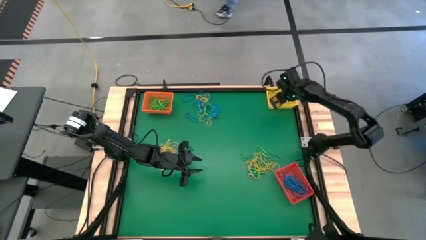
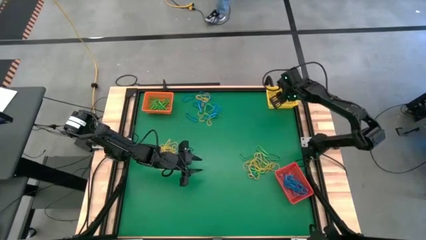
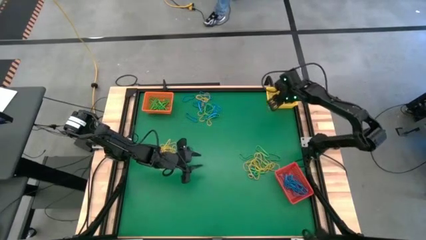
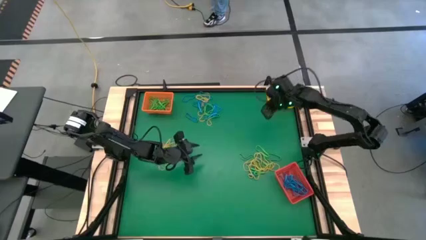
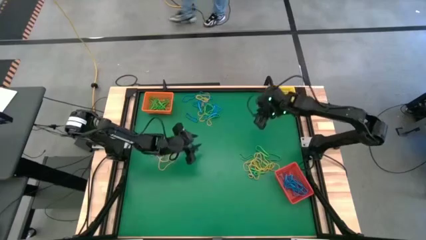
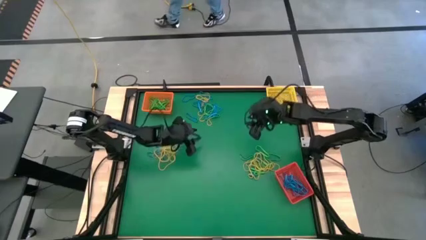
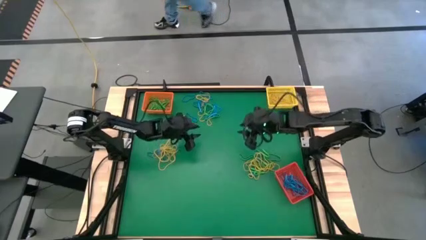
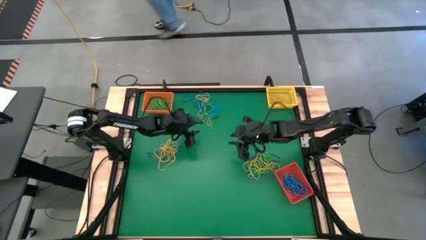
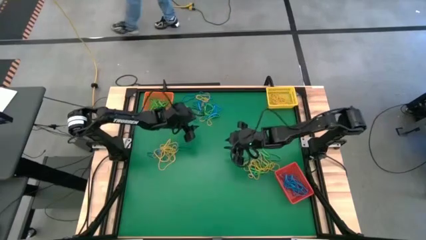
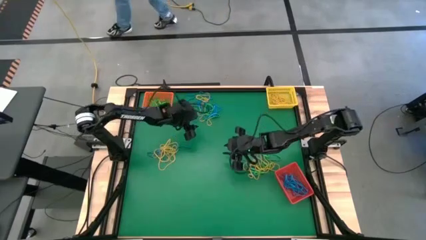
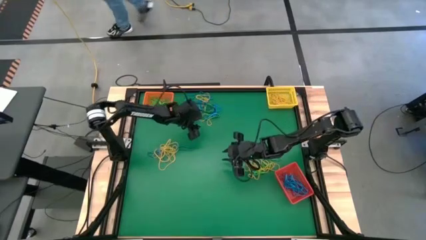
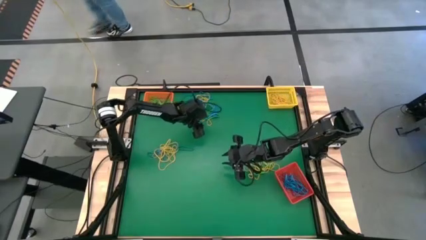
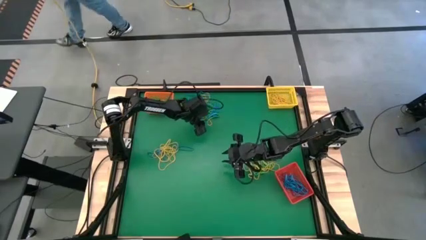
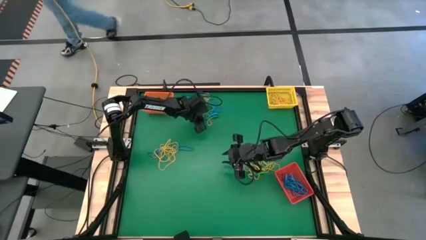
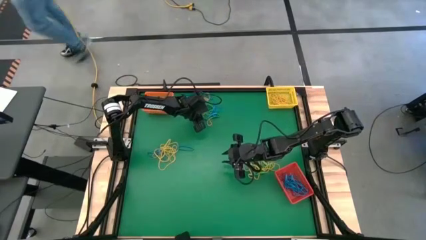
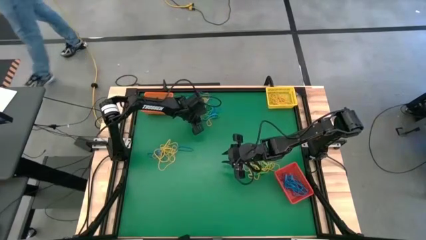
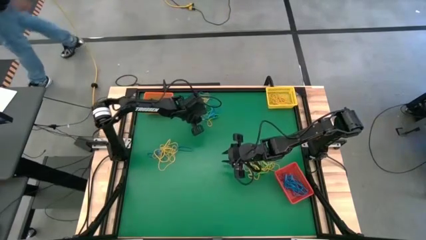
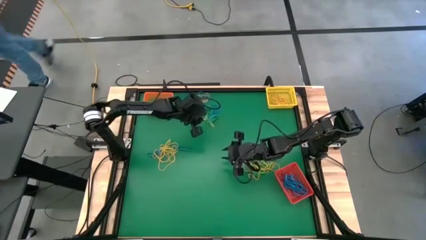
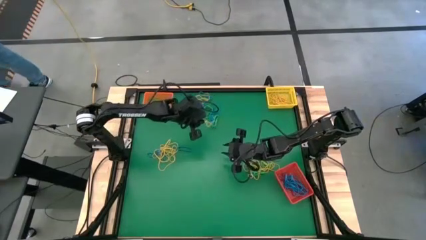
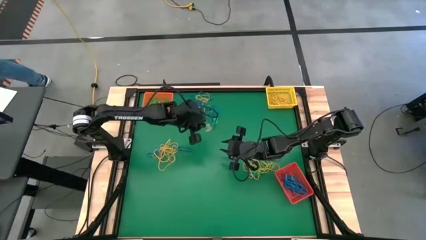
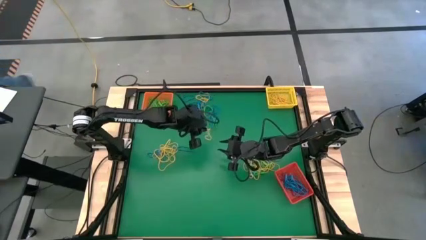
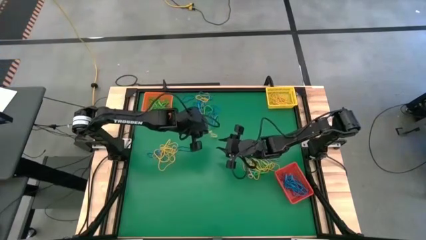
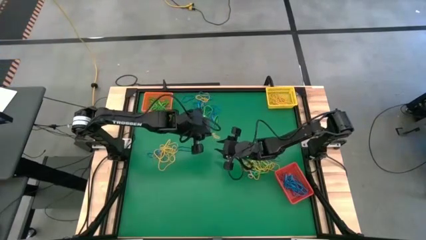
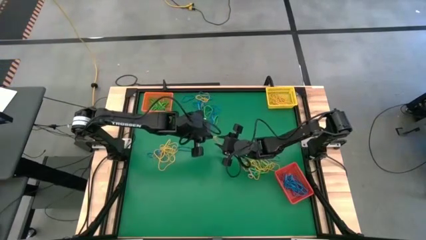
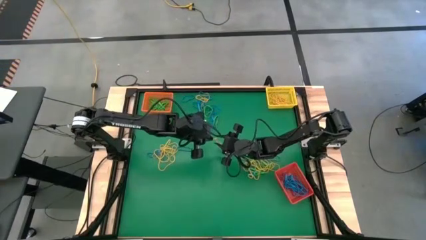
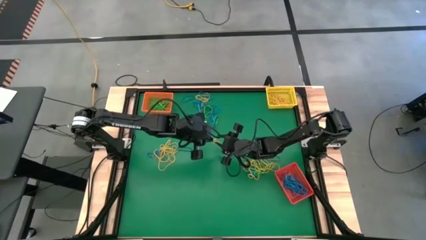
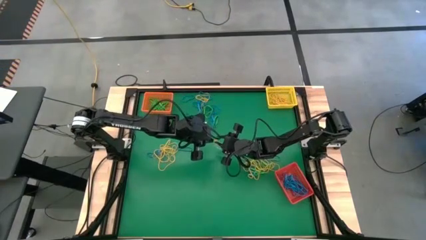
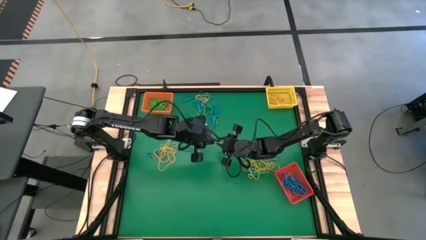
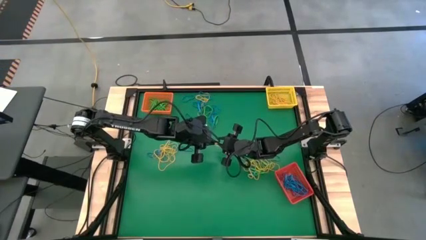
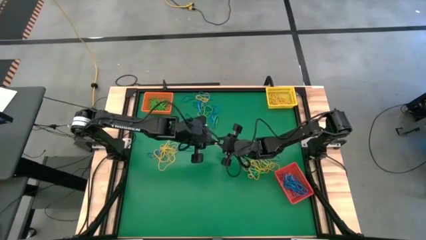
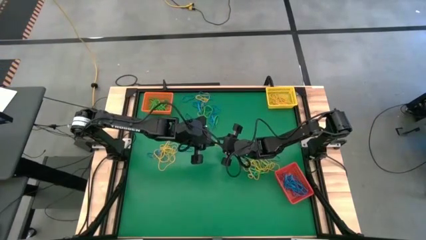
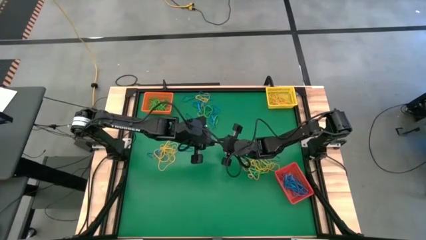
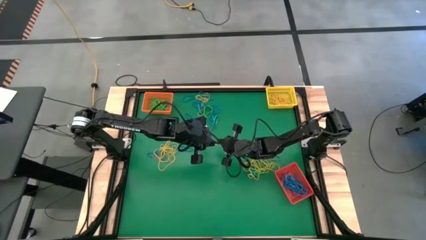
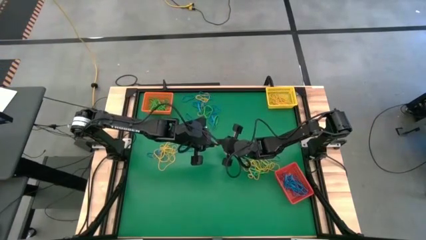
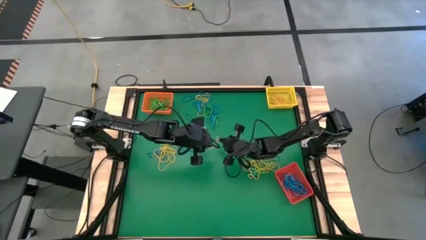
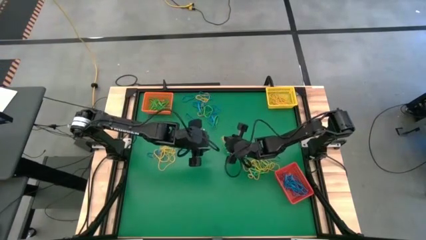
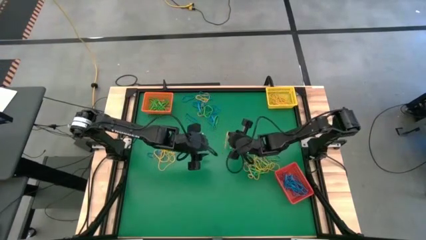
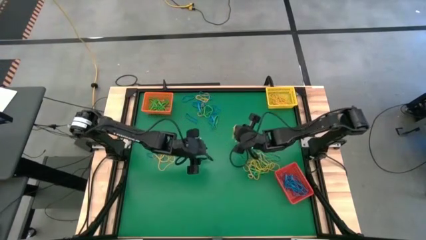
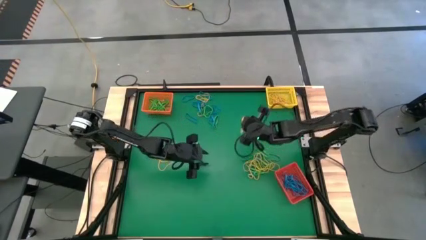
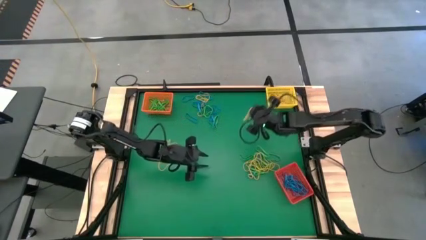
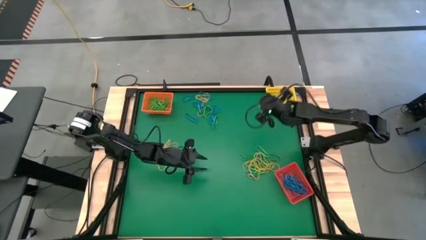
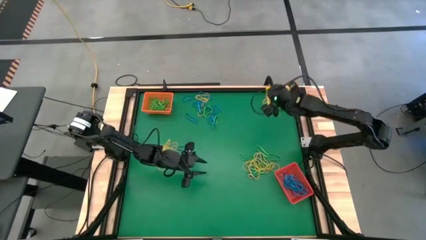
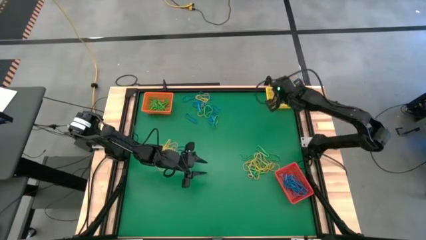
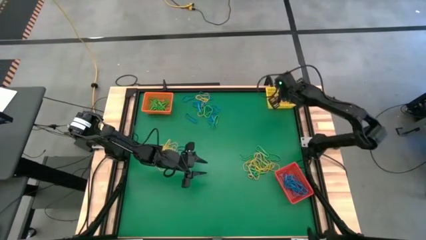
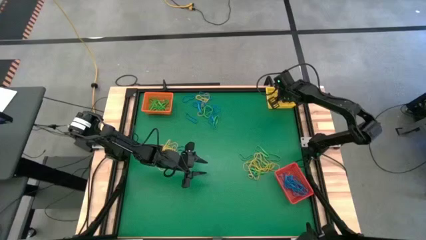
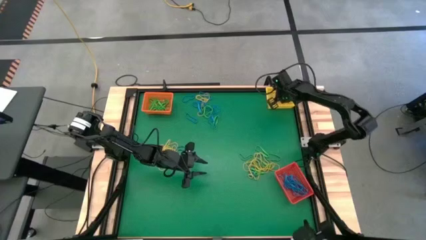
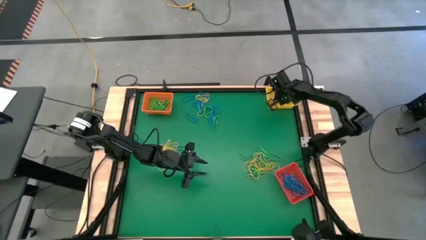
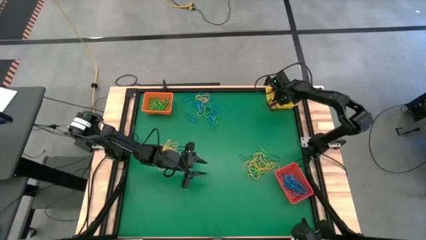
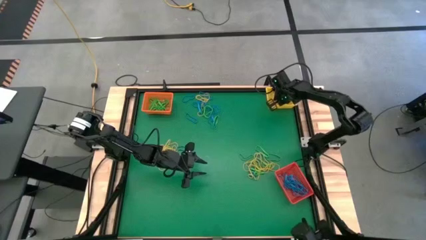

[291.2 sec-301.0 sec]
Task: Sort rubber bands into baskets
Put the yellow rubber band into the yellow bin

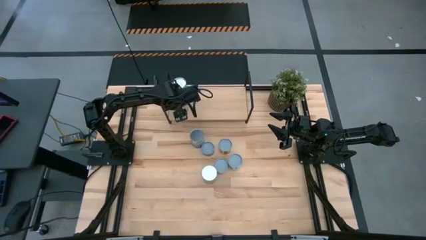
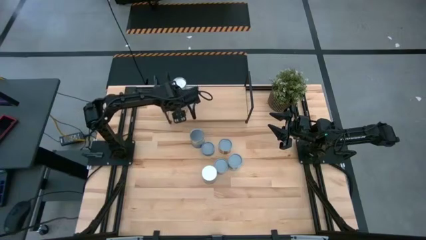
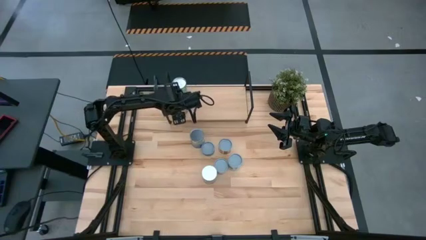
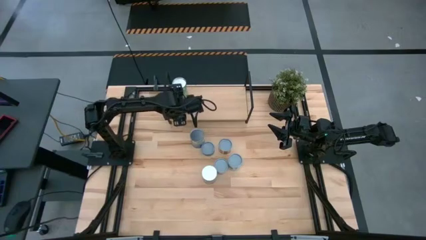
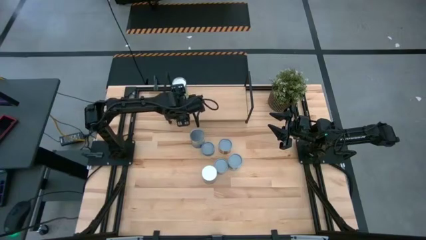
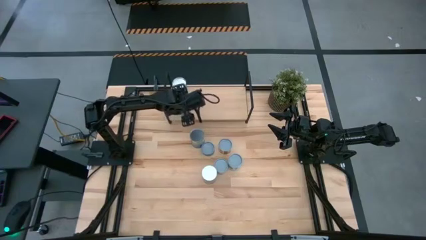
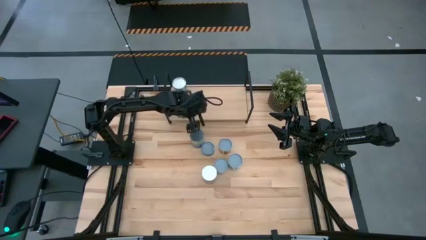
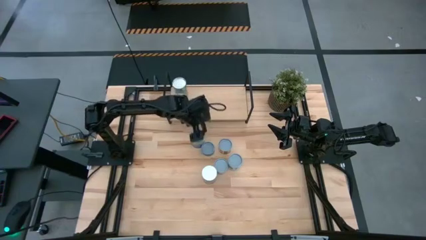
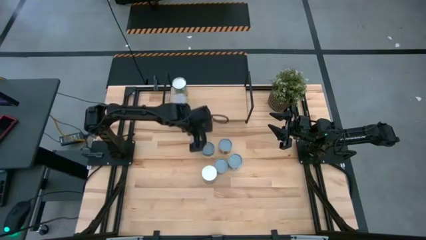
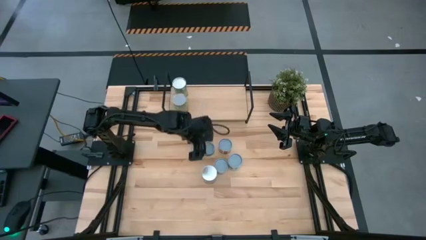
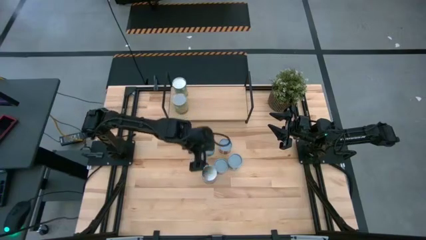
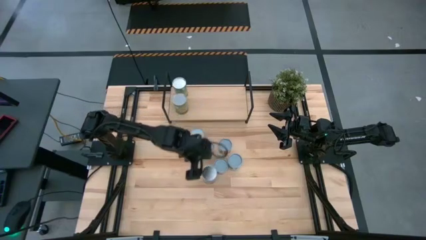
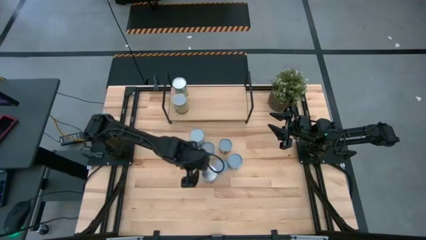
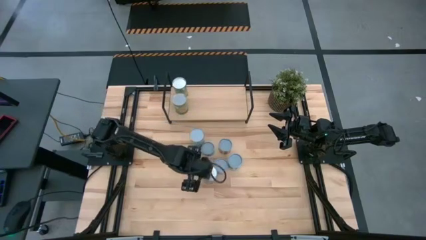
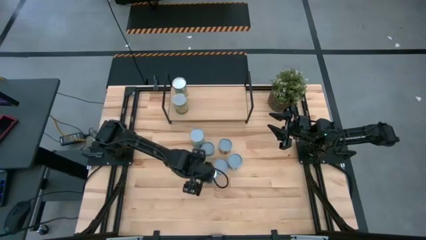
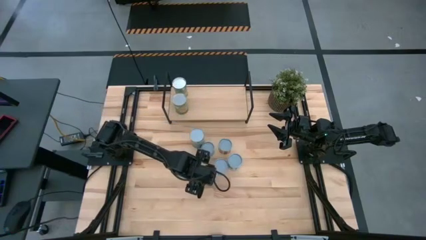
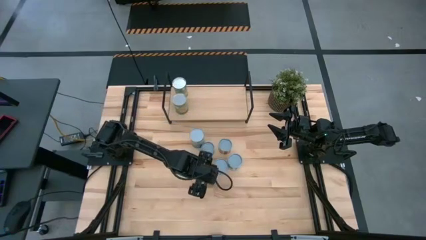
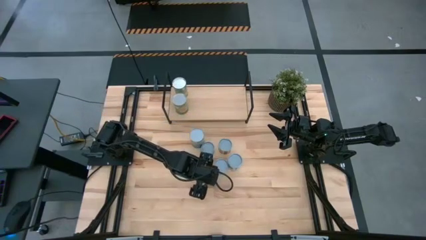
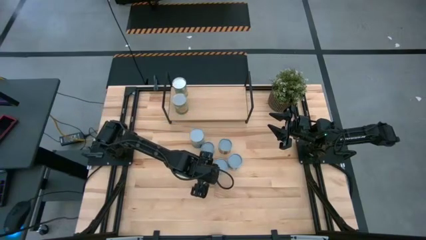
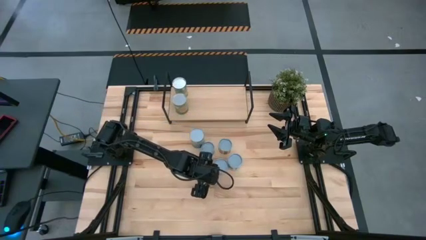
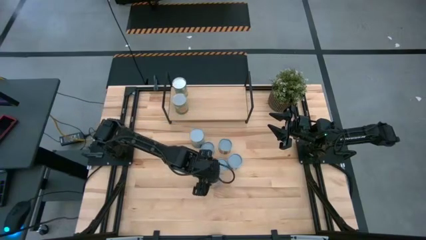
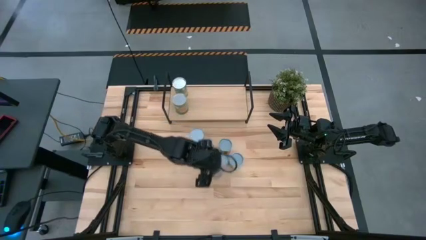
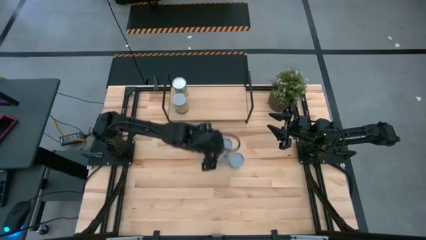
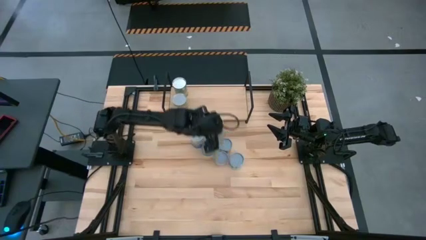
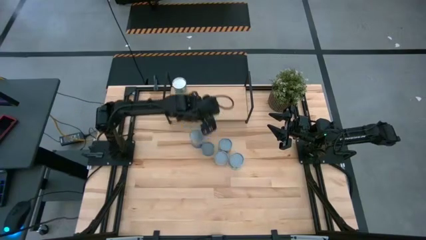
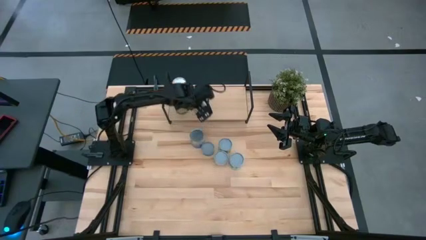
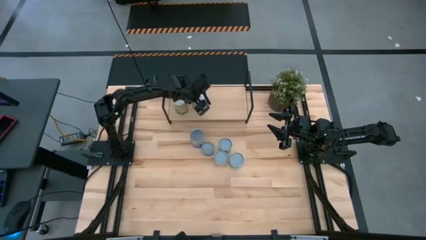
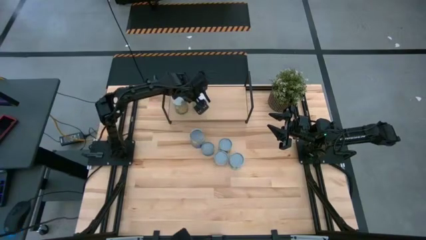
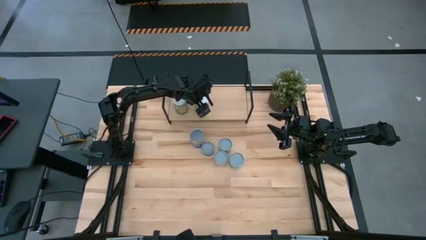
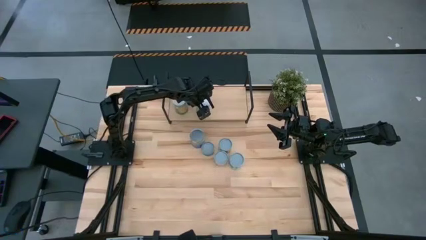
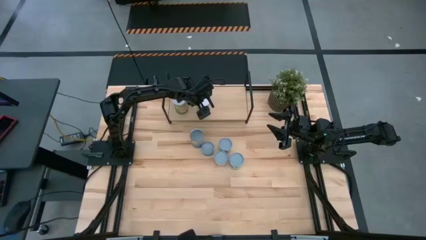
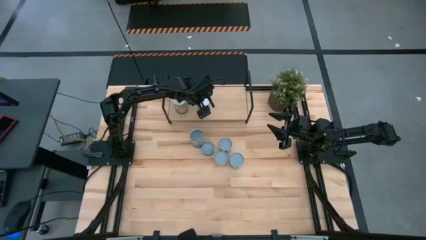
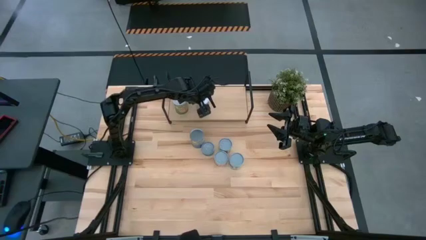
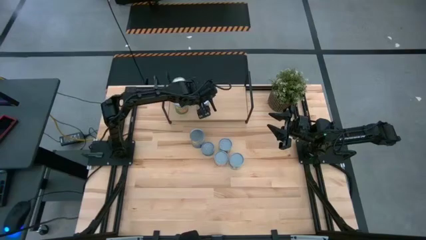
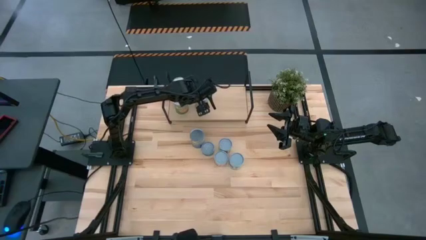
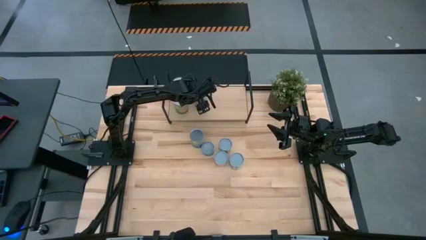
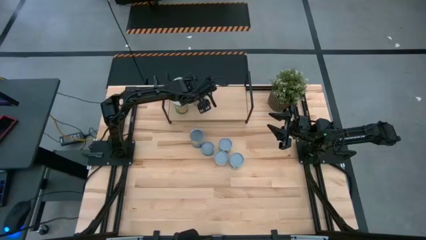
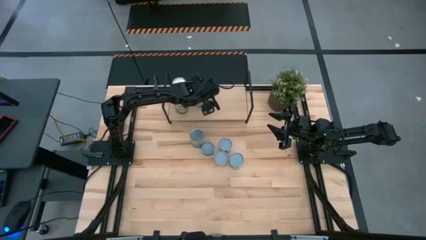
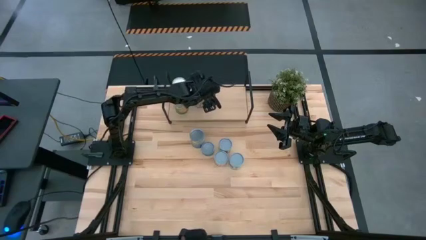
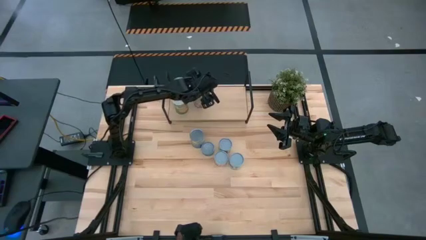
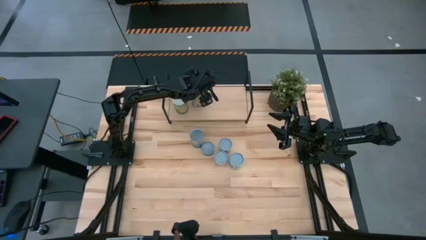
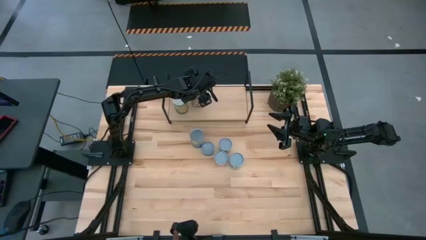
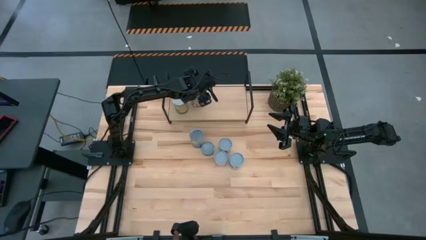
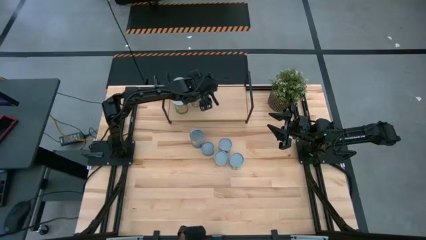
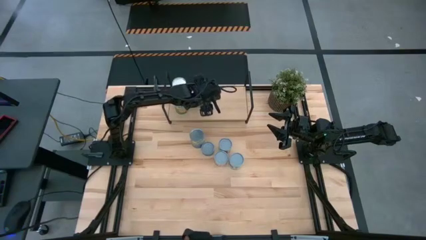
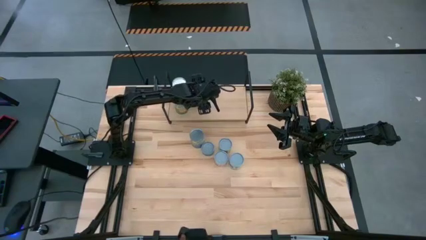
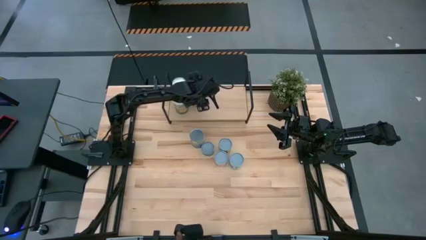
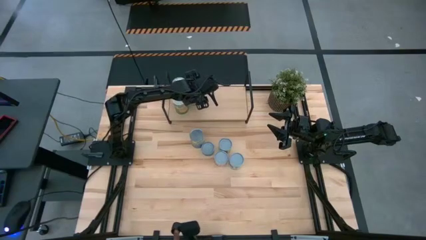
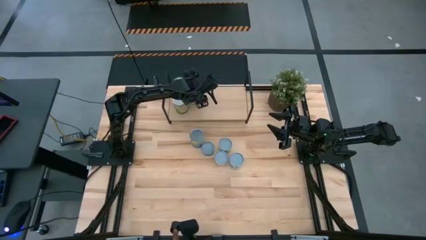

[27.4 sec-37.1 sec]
Task: Pick and place cans onto a shelf
Put the canned peaches on the shelf
